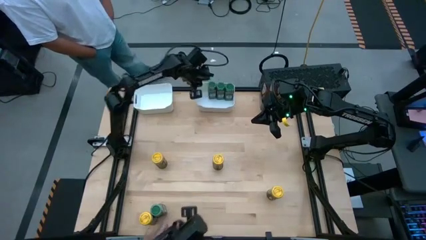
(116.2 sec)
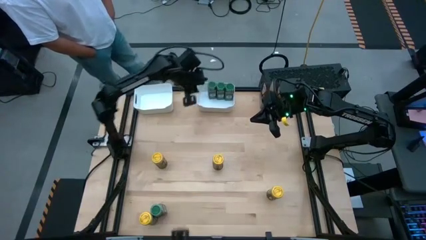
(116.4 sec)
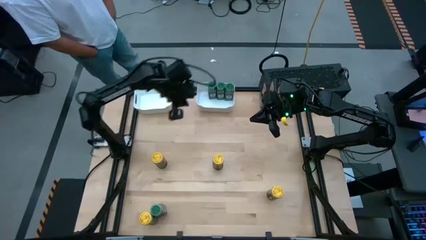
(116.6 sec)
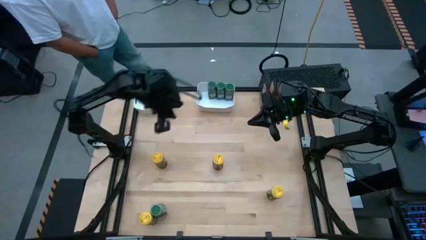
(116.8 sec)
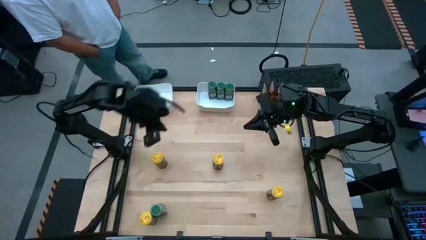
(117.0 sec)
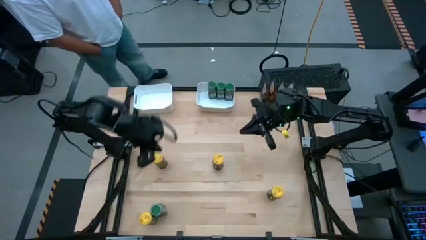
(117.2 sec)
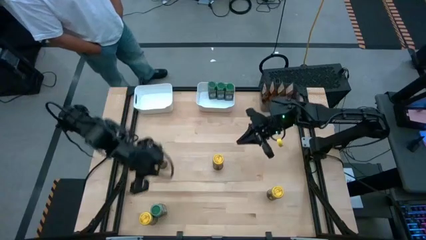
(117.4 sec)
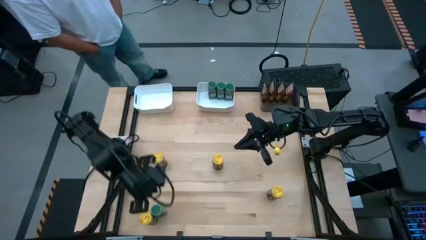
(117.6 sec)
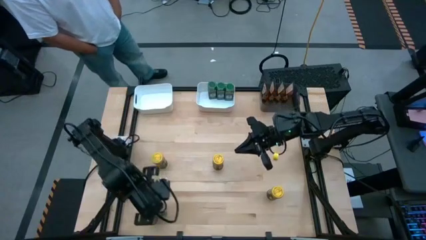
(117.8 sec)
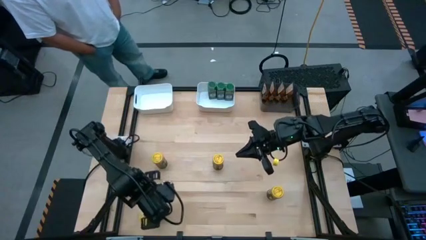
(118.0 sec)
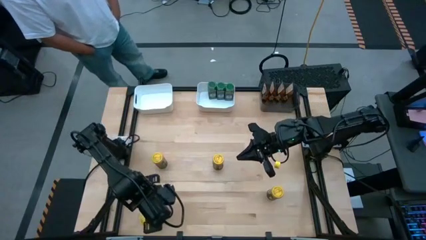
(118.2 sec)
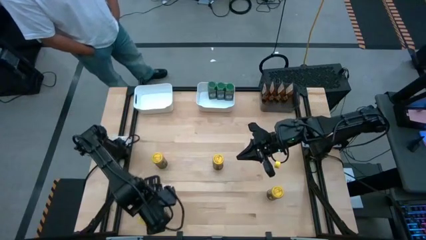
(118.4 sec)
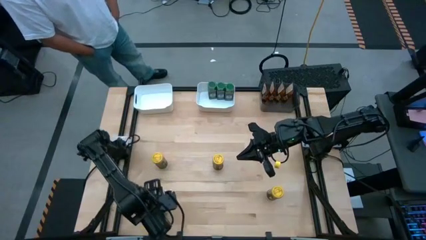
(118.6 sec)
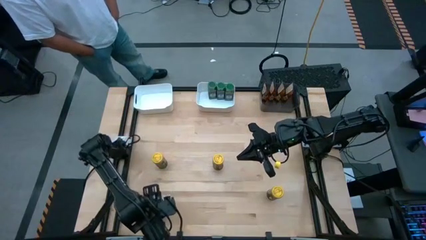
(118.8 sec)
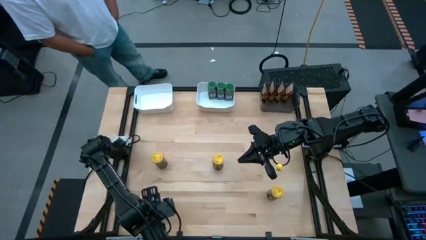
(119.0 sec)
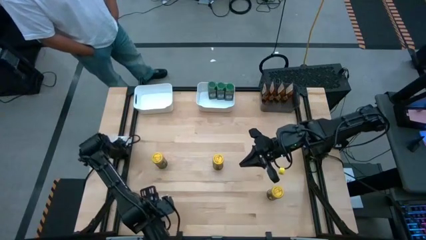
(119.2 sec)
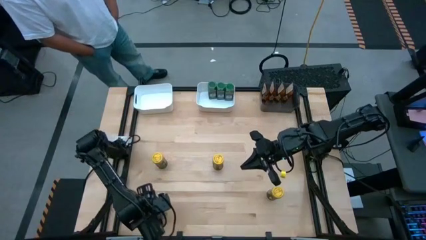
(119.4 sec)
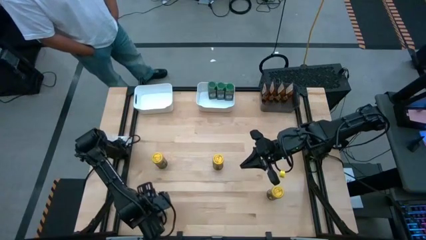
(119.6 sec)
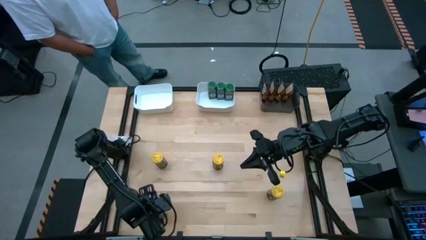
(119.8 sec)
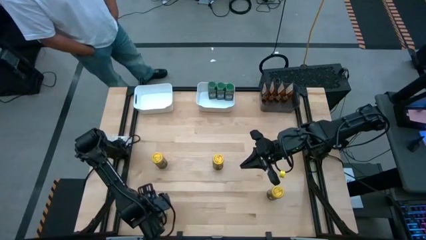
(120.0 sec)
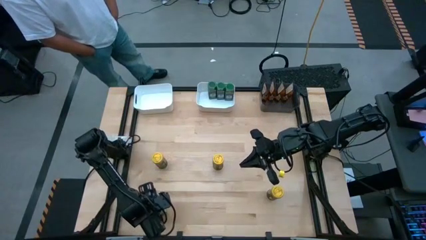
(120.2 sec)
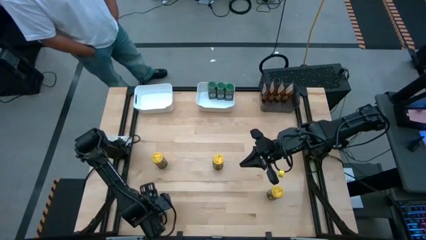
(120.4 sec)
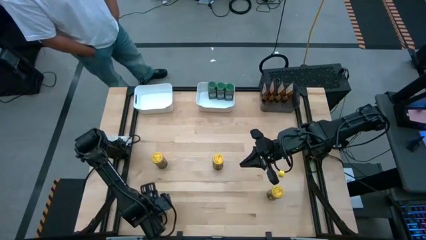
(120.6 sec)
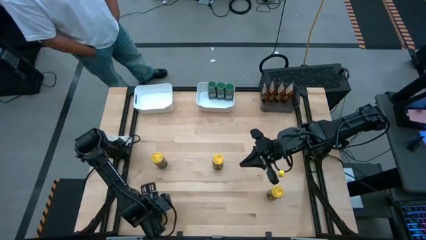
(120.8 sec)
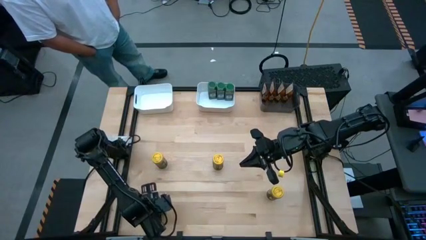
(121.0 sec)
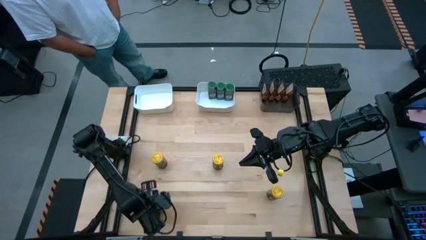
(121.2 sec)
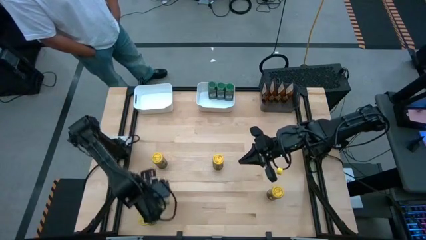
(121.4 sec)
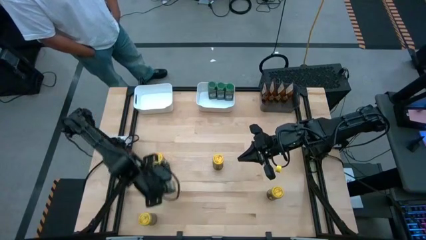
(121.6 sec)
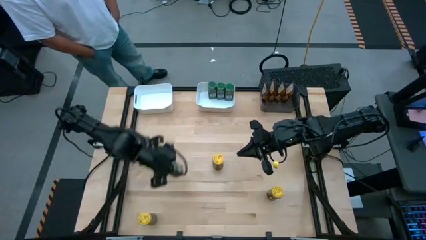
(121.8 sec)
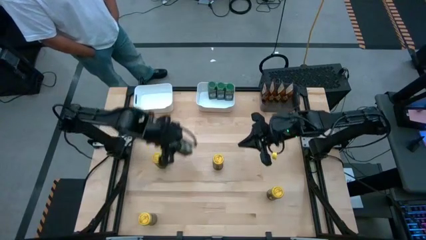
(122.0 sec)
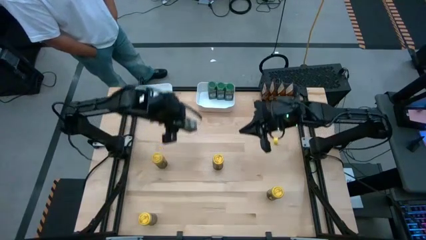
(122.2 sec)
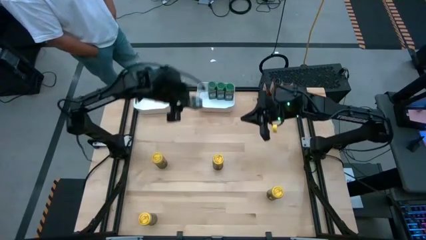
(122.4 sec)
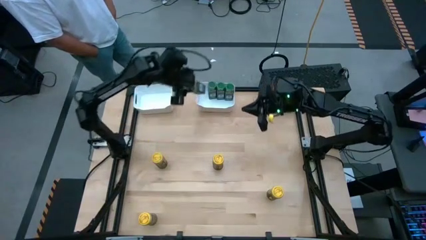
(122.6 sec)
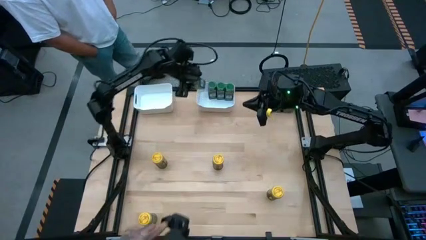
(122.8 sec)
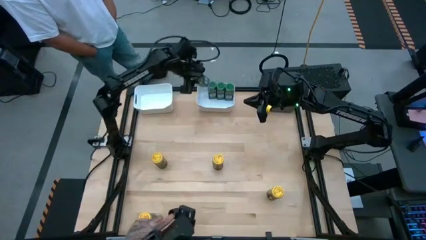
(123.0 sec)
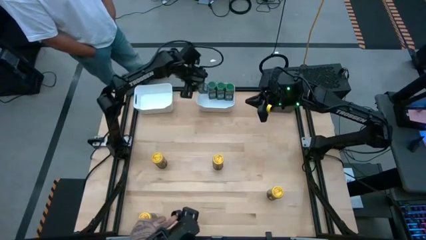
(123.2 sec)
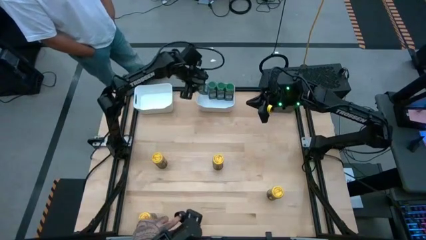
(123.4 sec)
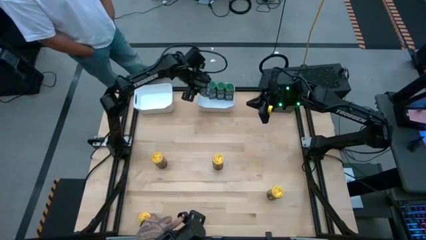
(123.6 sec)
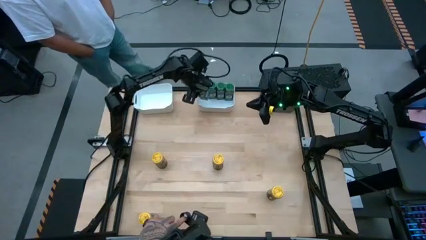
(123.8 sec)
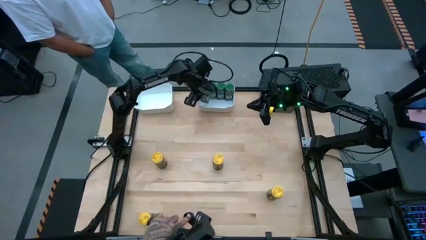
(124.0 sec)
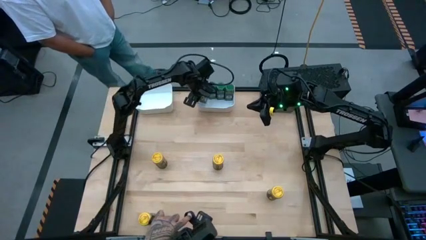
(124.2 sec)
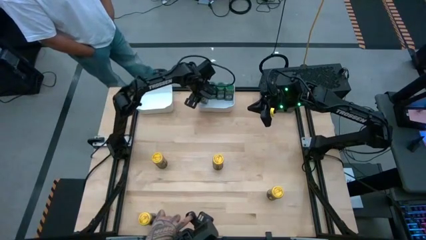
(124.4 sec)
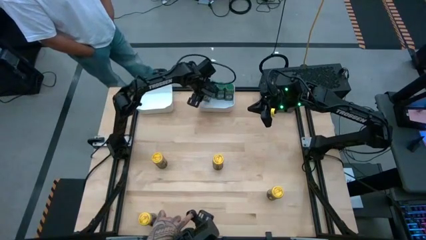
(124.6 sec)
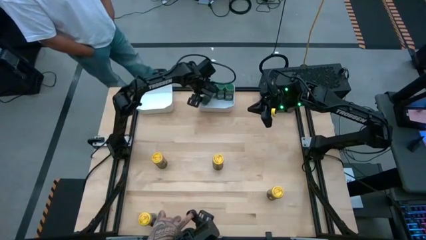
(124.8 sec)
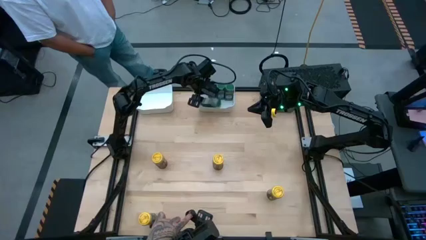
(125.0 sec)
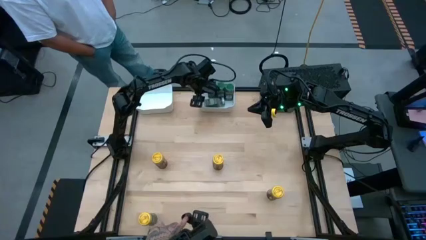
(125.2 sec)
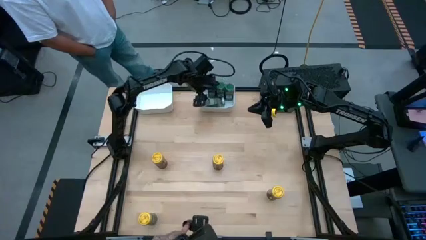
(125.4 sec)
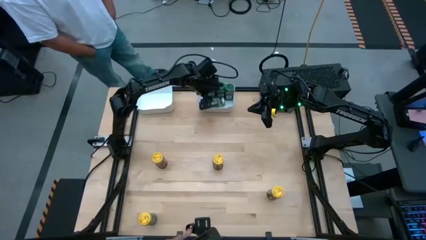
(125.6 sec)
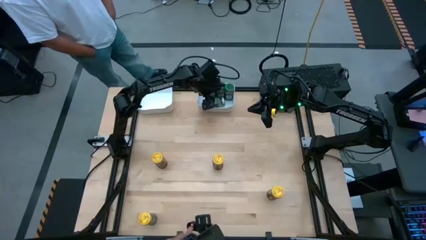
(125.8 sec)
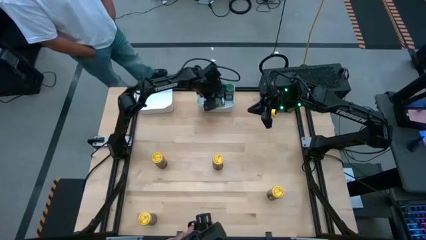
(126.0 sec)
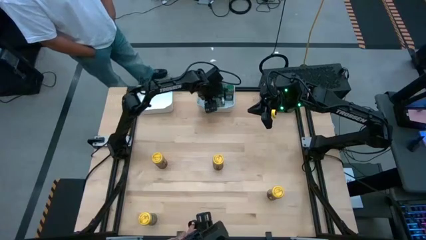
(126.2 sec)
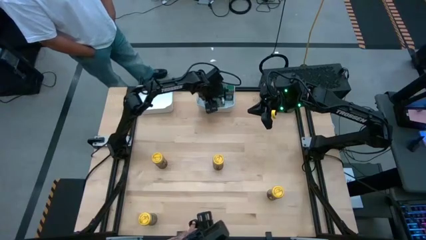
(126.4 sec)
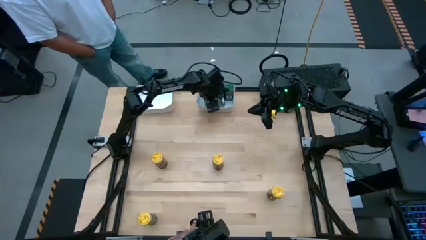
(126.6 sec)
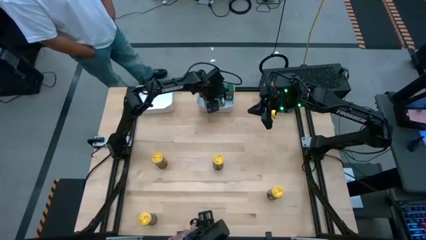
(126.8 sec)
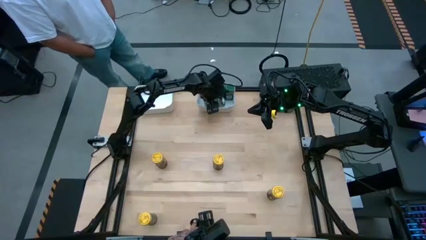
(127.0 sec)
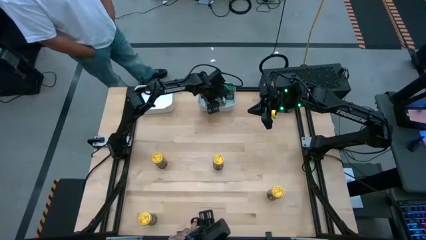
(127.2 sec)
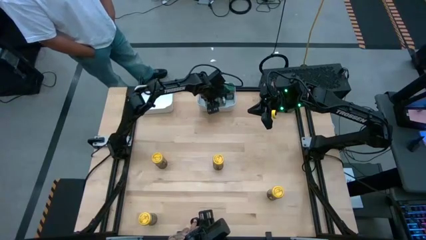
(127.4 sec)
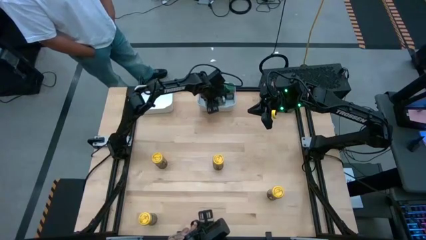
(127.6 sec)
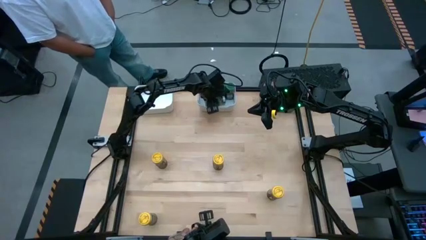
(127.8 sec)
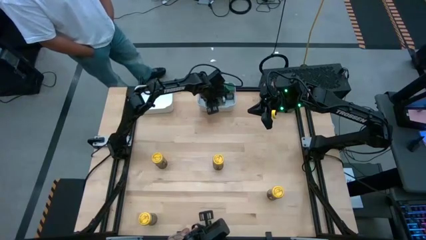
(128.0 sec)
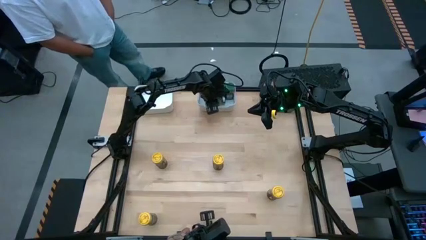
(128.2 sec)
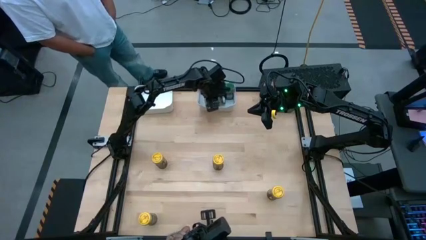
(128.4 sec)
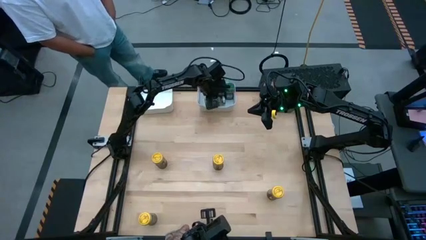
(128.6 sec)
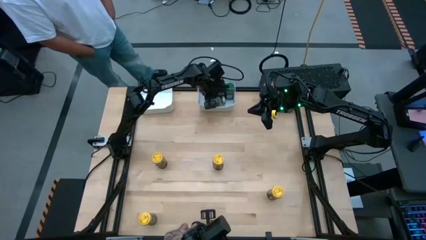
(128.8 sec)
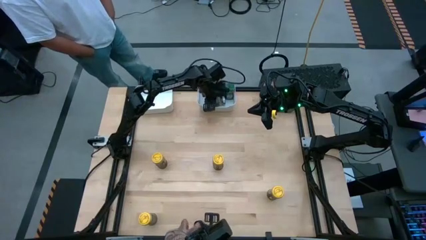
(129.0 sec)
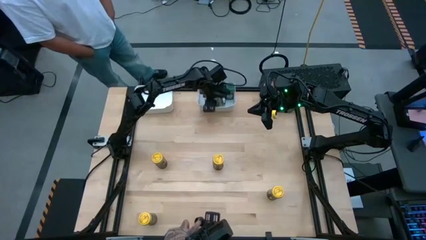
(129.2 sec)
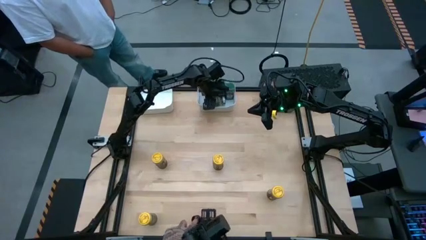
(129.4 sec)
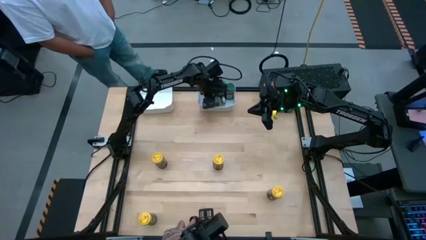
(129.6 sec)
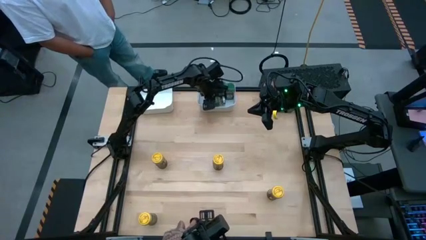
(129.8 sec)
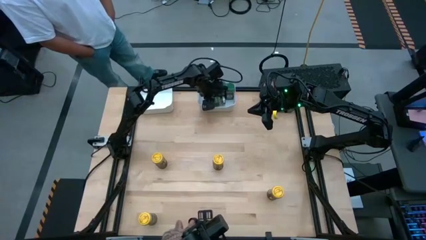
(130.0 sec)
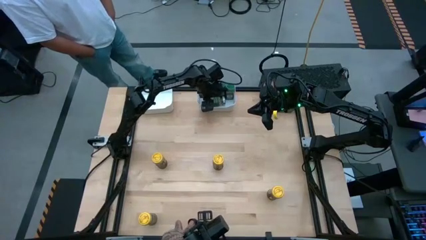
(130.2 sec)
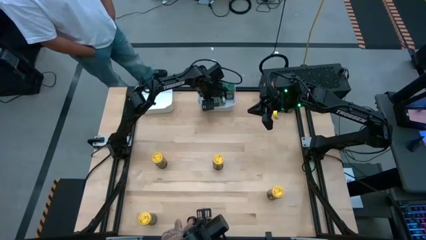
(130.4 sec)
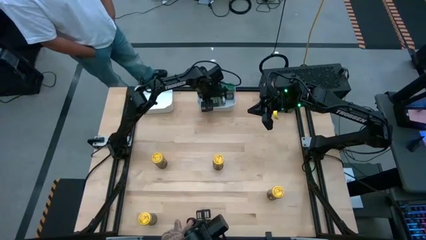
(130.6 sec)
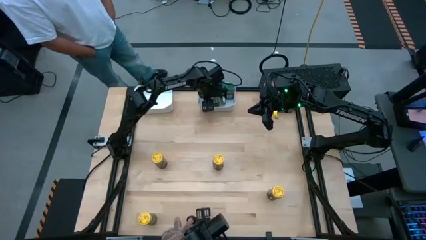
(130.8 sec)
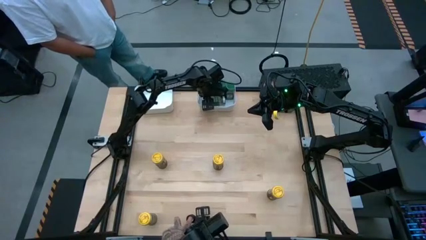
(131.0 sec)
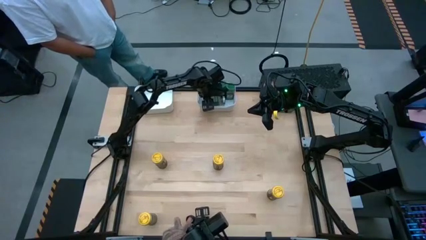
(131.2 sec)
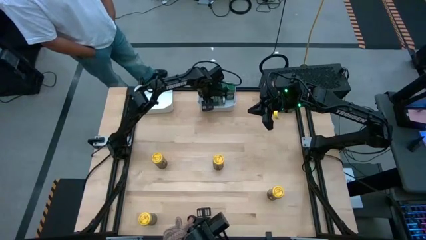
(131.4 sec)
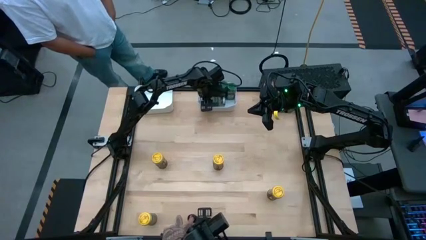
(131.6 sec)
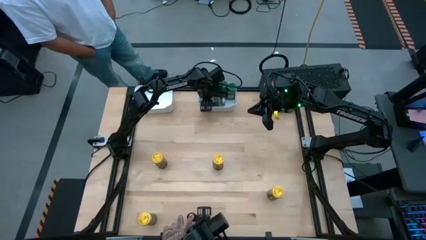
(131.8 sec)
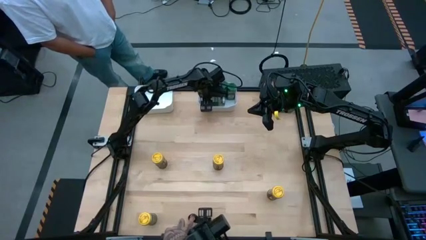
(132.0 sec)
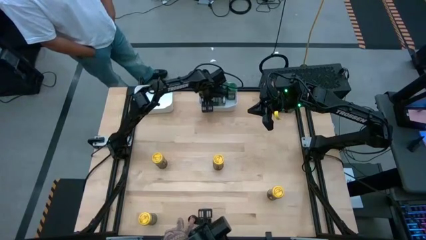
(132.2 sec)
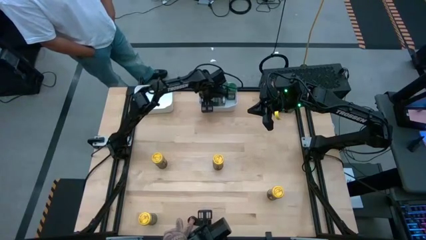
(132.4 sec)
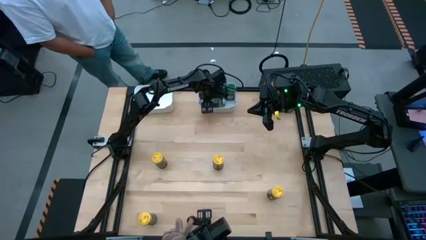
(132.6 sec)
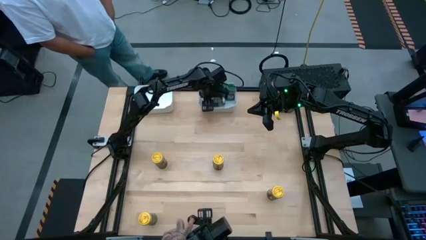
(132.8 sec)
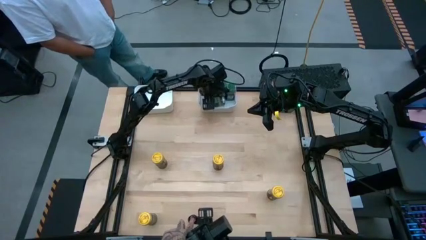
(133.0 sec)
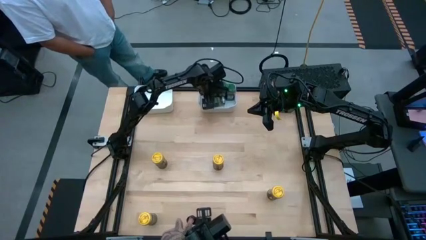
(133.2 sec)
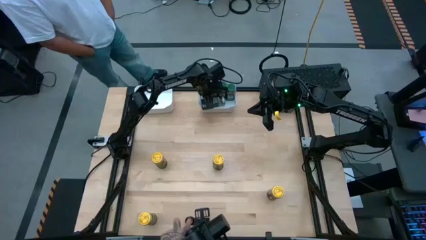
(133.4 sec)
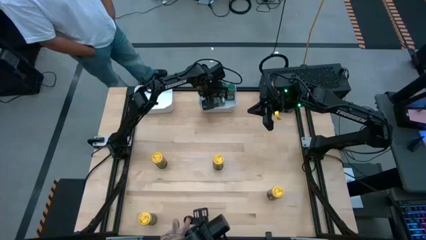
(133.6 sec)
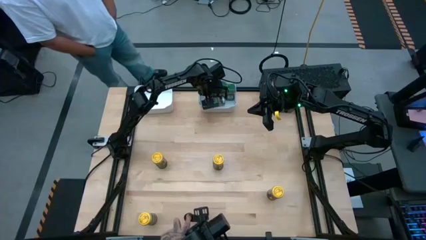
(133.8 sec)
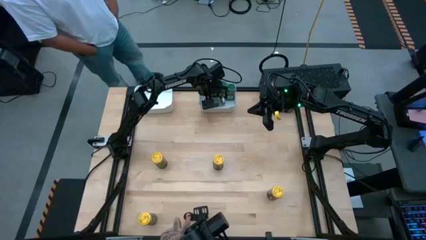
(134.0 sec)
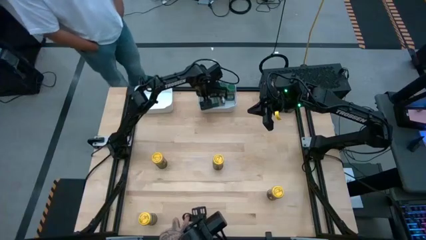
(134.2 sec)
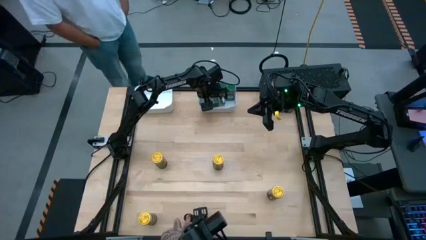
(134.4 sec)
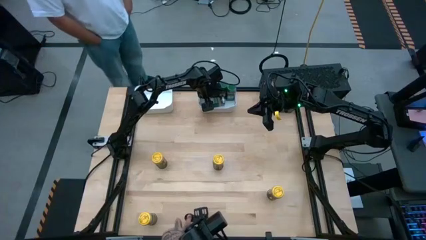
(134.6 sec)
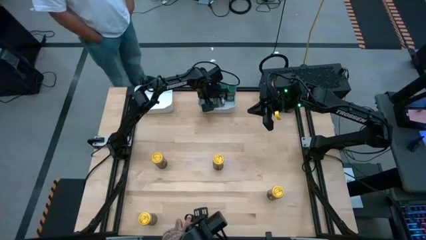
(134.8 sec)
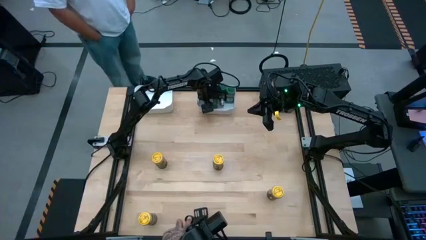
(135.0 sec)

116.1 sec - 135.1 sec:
Task: Sort spices by type
Put the green seasoning bottle into the right white bin
